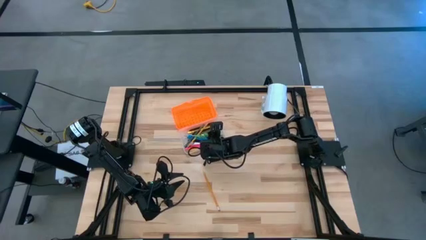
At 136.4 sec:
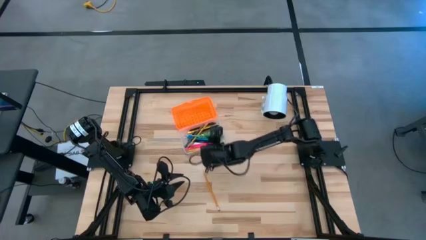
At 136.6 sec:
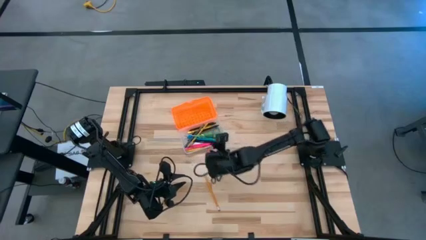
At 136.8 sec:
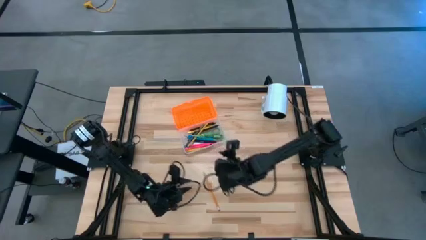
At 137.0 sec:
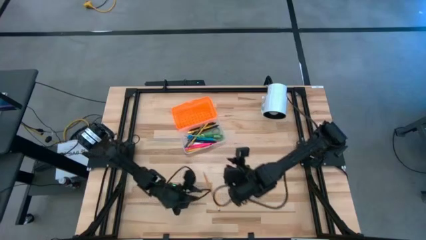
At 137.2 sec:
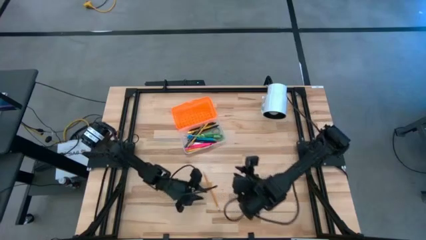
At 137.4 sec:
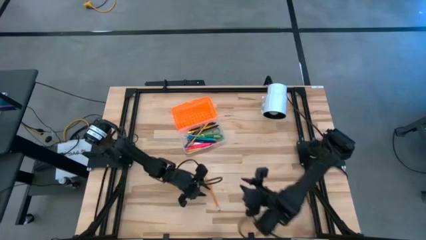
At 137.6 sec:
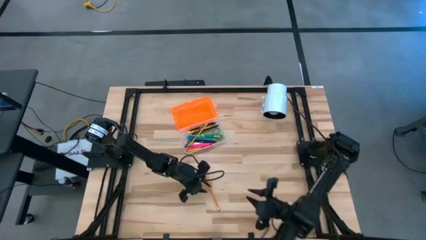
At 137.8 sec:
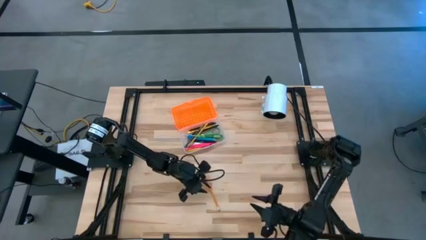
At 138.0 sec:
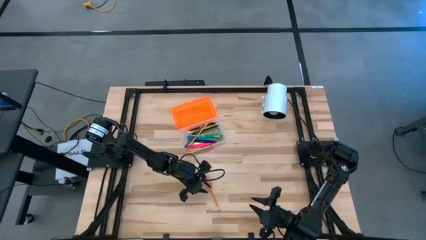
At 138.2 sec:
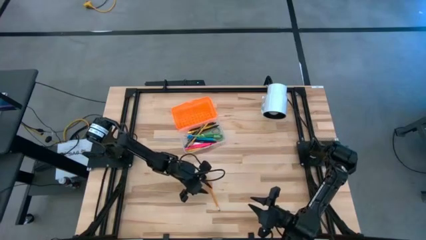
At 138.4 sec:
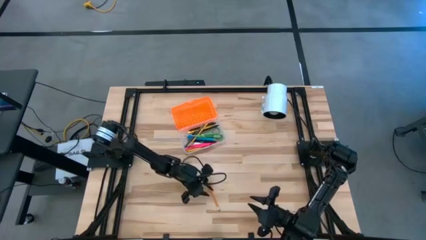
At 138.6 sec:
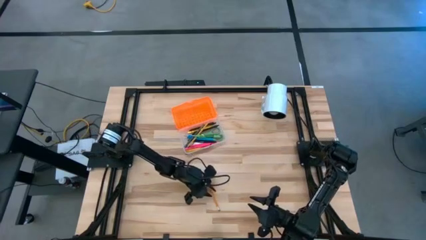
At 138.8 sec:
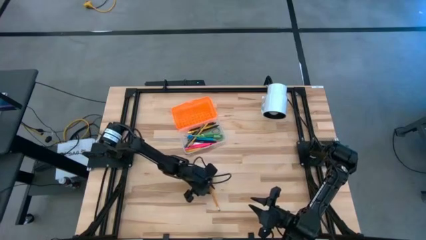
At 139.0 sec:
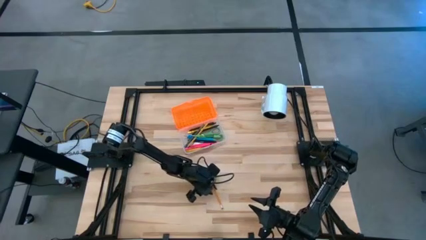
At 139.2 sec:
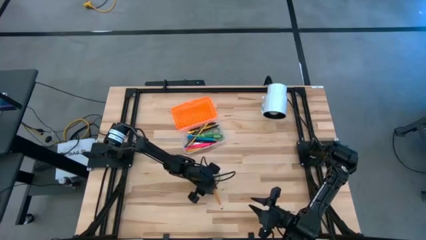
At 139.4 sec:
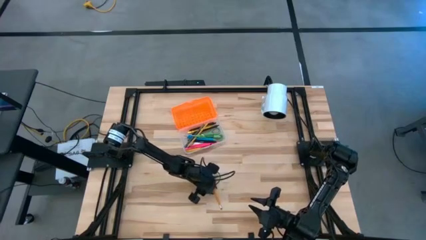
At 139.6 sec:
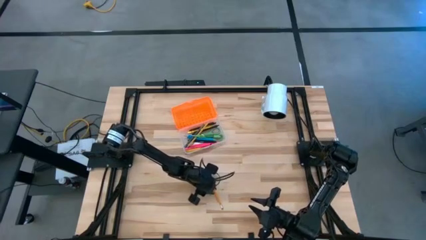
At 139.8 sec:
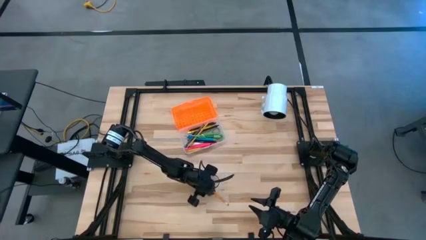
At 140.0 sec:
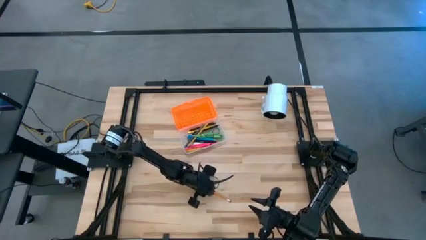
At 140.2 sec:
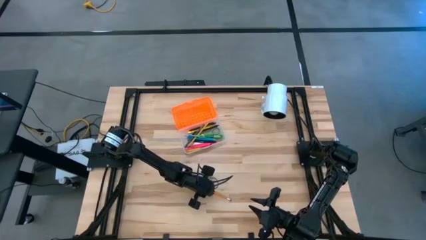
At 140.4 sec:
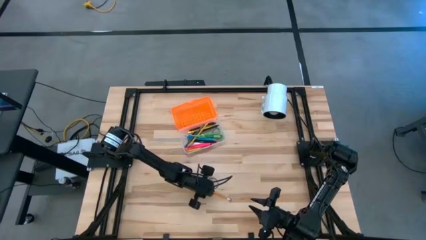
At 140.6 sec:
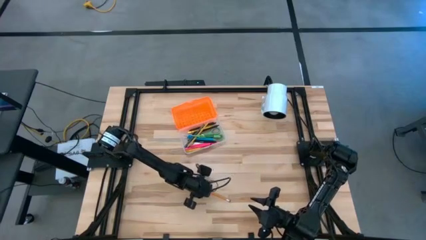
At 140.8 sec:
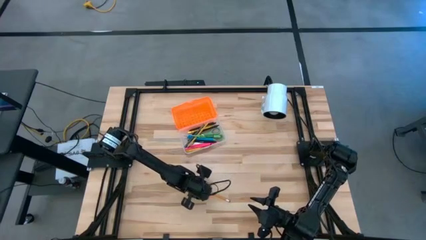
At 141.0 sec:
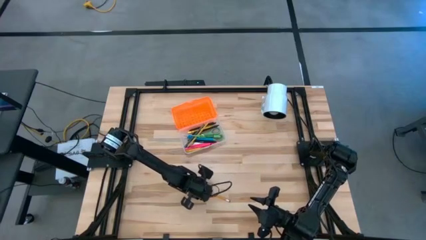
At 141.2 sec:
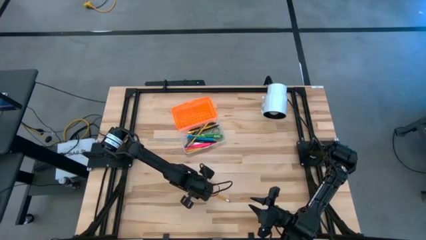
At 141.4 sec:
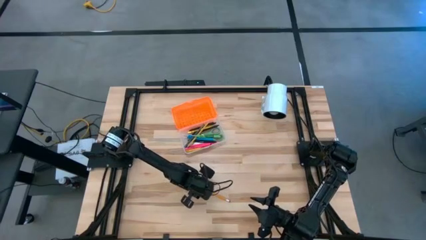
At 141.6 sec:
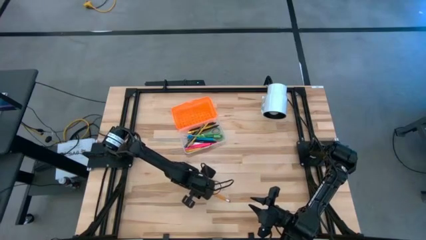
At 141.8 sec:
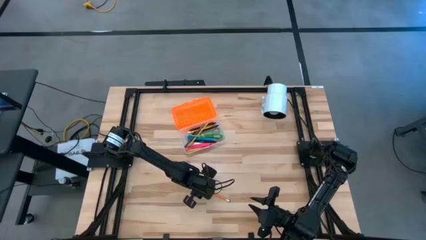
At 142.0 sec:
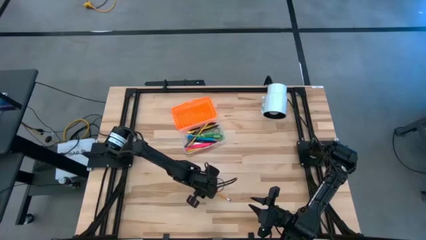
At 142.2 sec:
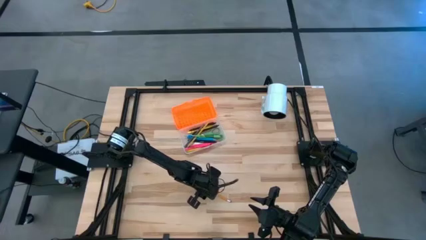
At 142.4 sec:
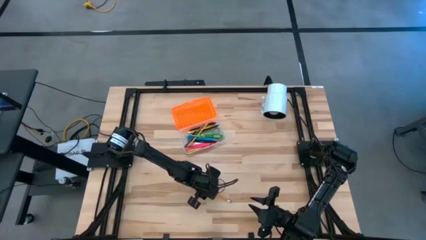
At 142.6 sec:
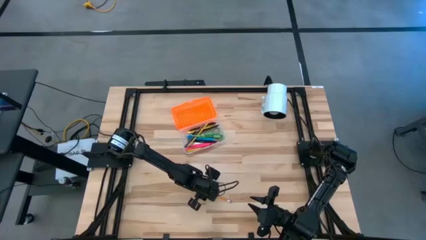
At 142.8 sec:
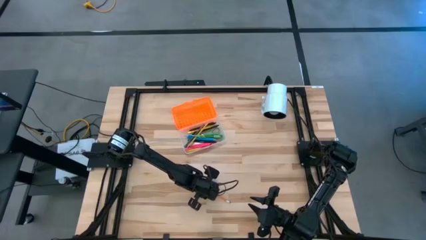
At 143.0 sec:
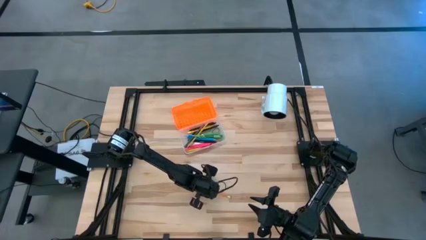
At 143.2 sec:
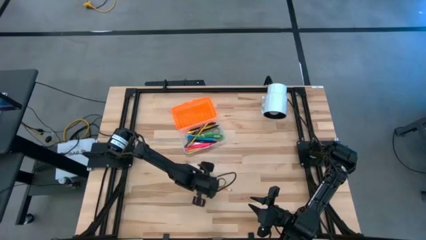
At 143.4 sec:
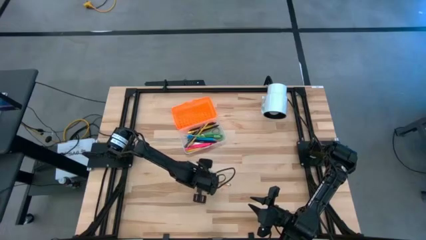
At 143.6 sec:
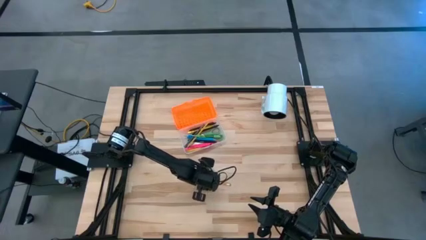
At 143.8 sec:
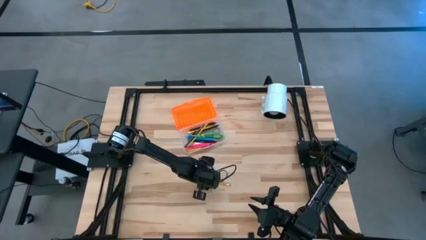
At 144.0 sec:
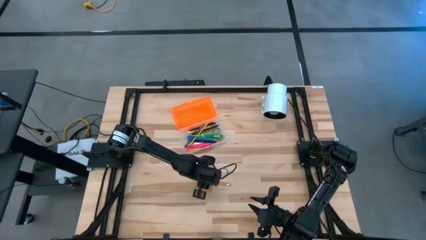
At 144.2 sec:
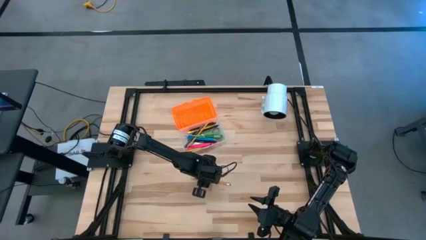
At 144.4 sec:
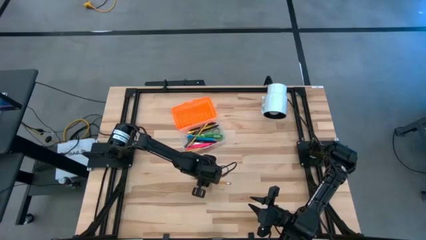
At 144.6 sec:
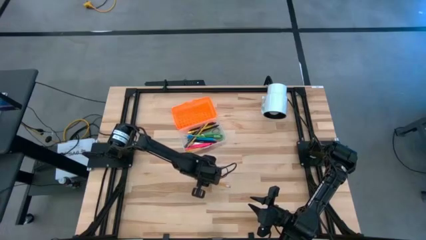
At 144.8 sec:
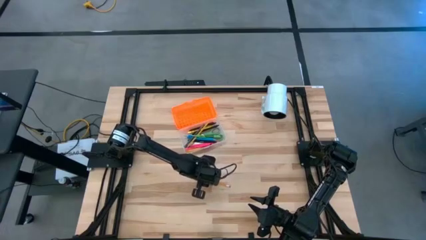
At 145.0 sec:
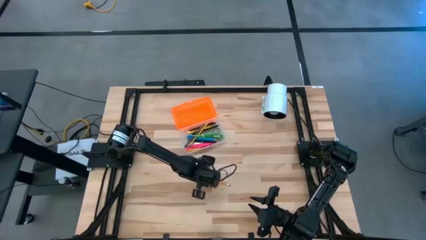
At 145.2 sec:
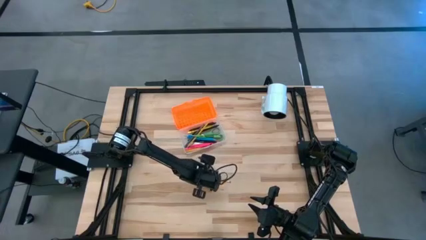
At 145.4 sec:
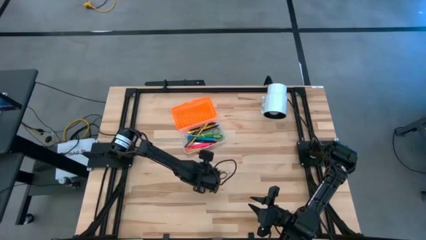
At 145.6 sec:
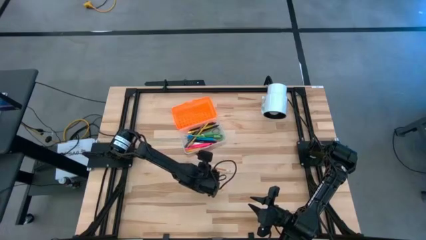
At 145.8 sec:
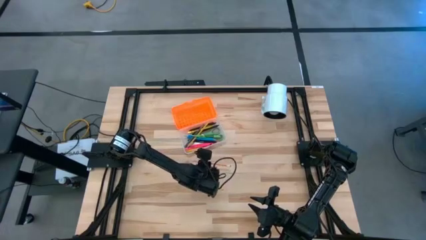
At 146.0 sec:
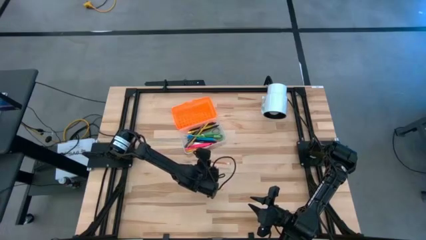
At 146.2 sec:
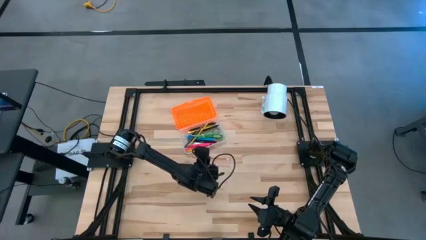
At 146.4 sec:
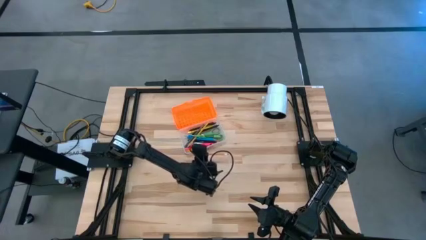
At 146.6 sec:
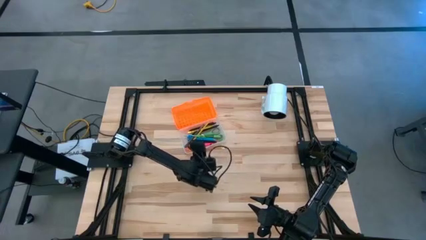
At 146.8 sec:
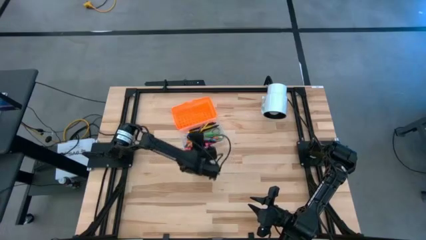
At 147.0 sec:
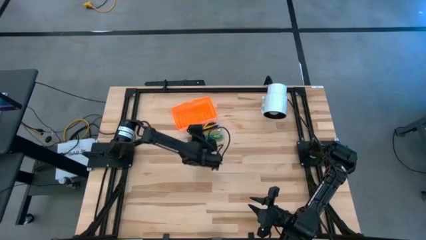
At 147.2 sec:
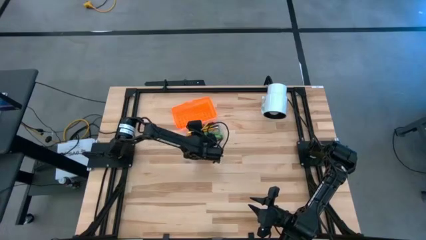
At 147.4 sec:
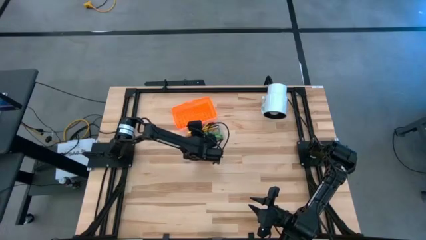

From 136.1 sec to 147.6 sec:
Task: Pick & place school supplies into a supply box
Put the orange pencil into the supply box

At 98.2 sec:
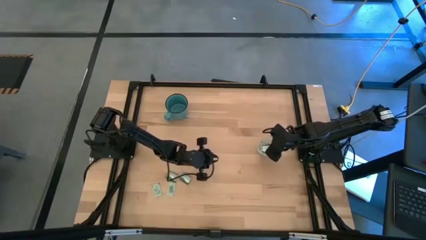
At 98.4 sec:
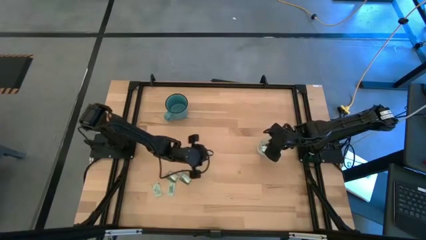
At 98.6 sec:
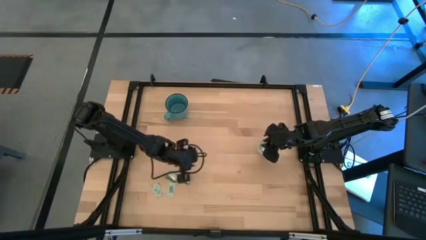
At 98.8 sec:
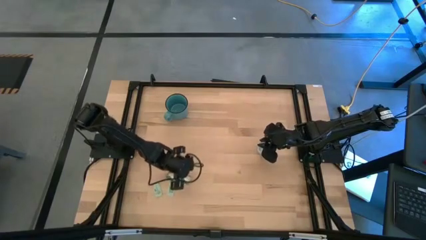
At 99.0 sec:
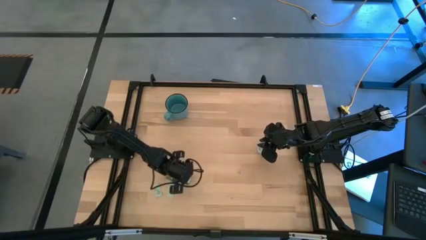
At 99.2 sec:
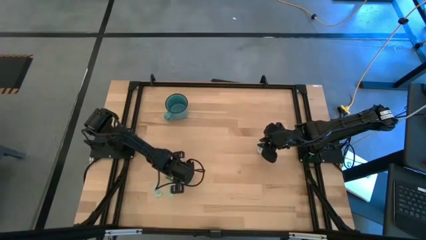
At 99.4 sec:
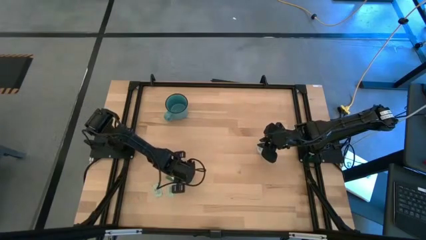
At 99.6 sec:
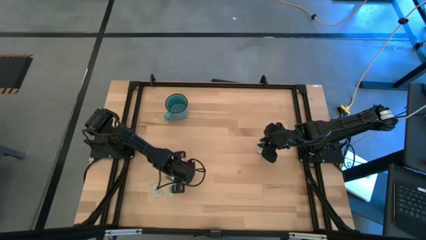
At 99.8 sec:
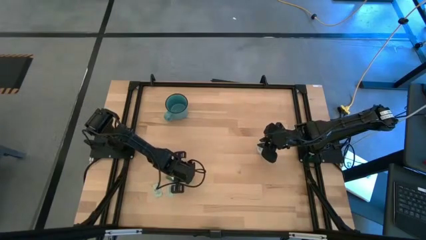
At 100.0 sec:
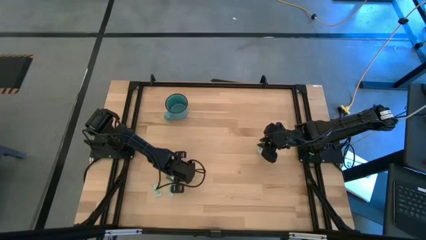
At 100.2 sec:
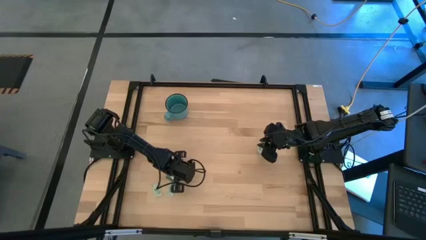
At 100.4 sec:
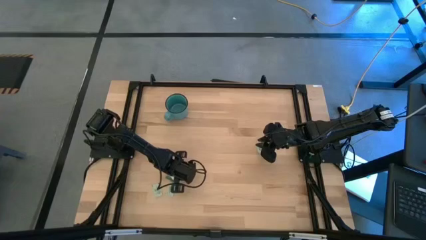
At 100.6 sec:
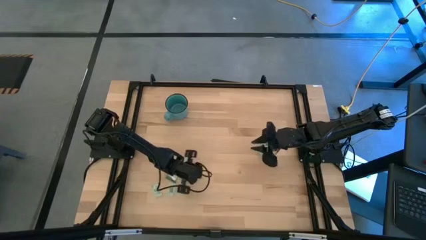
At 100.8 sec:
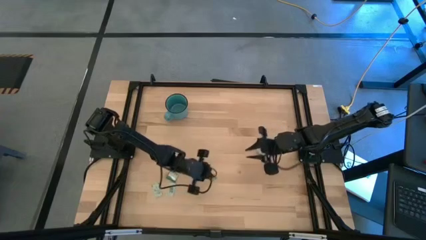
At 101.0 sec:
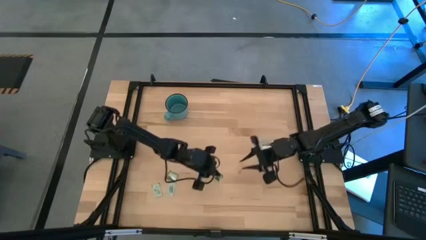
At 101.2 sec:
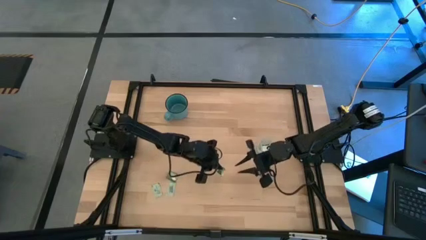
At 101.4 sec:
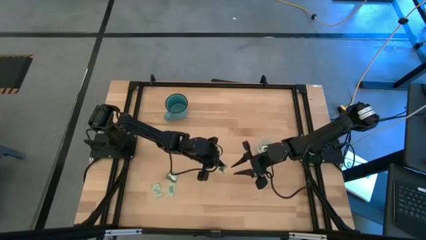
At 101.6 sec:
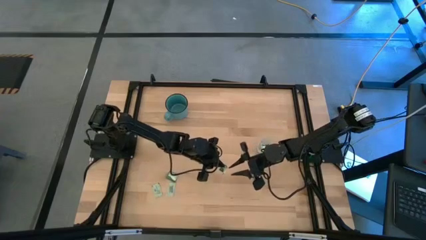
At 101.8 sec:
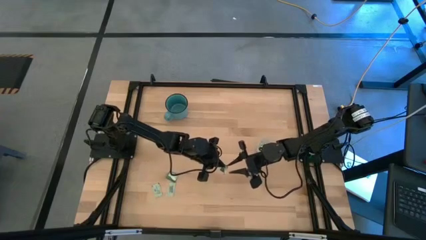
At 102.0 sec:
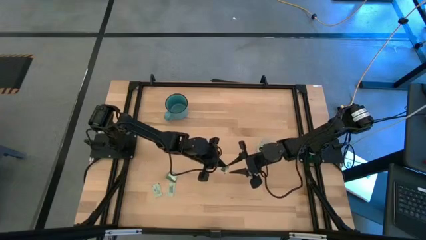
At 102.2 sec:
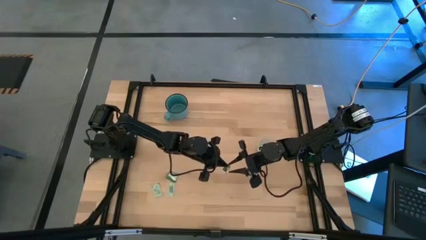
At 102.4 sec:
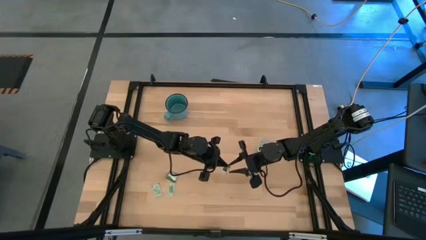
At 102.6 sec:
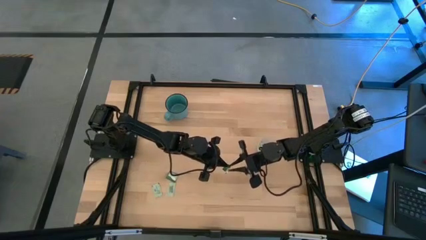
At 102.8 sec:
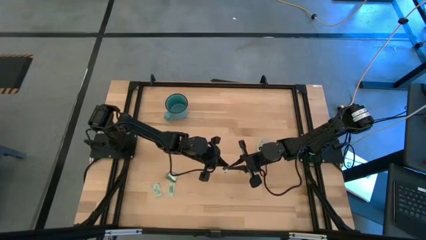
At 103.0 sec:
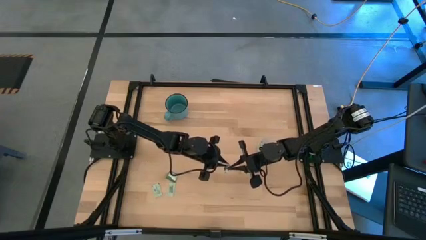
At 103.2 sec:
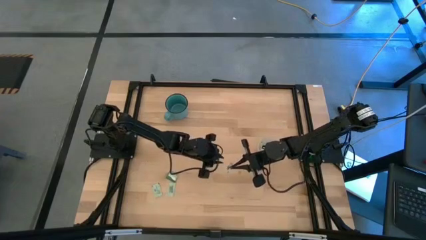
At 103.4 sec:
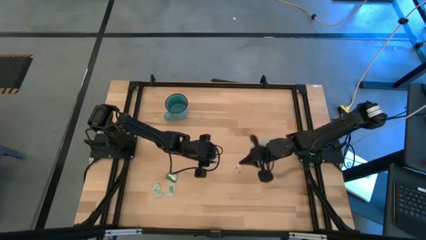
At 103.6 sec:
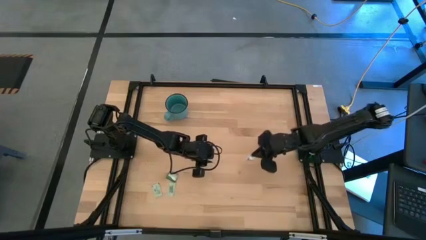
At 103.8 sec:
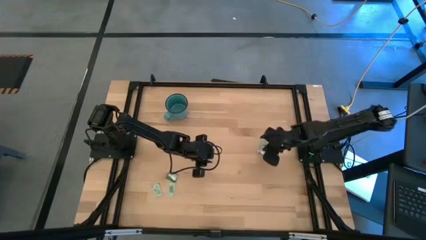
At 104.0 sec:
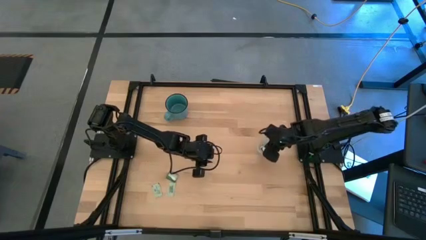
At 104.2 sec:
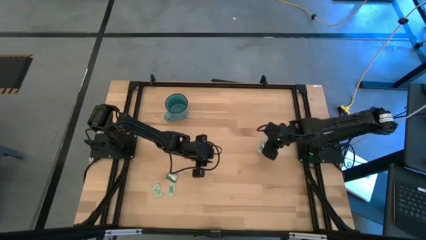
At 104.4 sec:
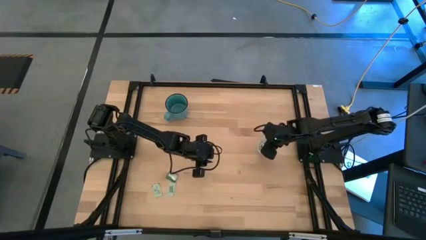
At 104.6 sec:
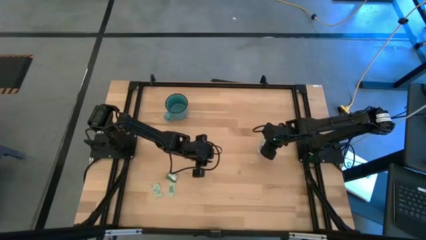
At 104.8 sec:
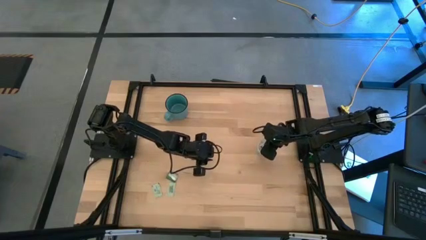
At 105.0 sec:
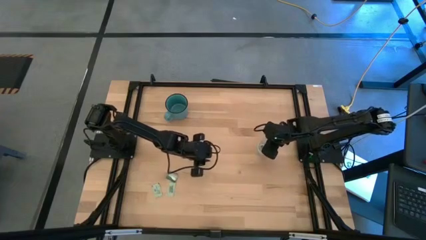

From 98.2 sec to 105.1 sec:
Task: Pick and place Stevia / Truvia into bins
Put the truvia packet into the transparent bin
